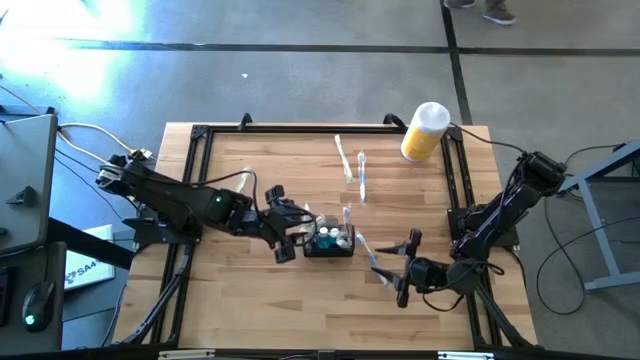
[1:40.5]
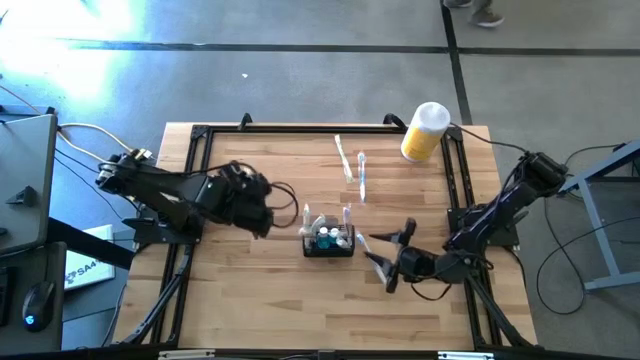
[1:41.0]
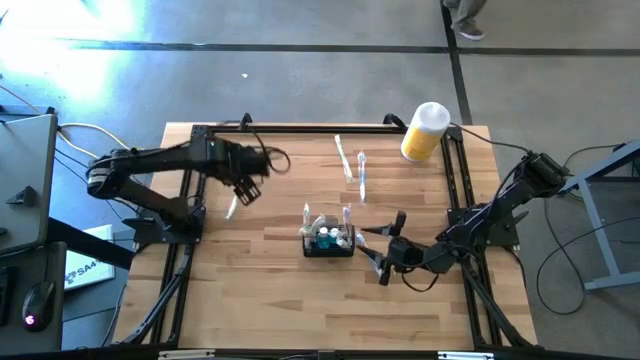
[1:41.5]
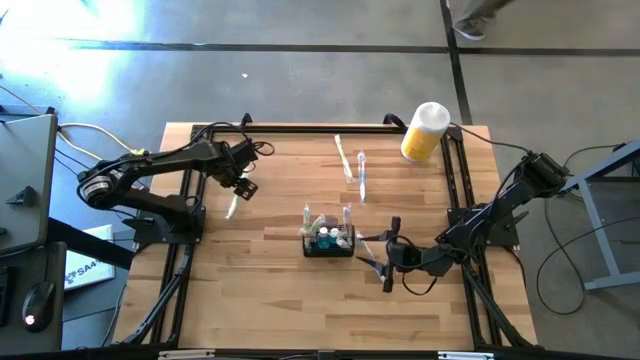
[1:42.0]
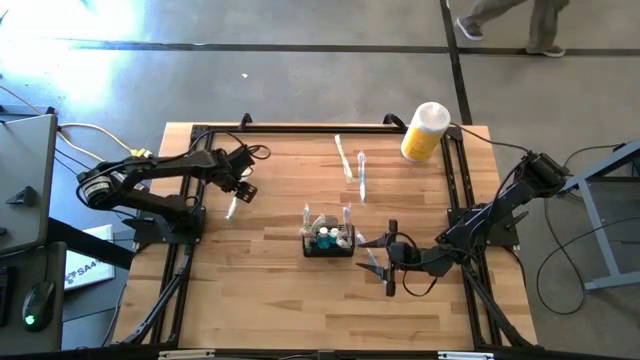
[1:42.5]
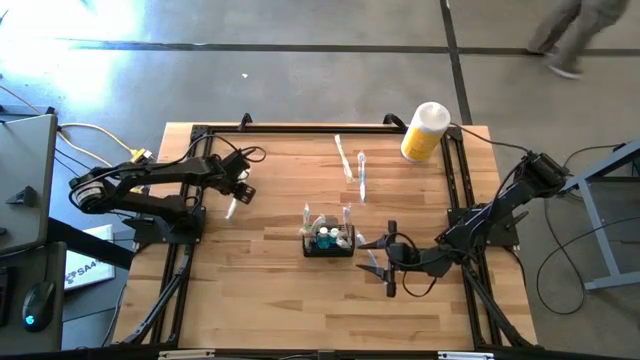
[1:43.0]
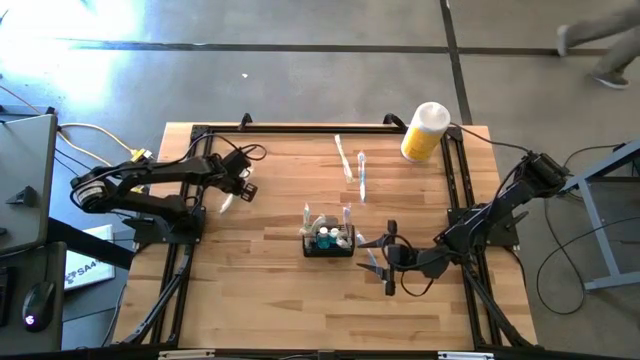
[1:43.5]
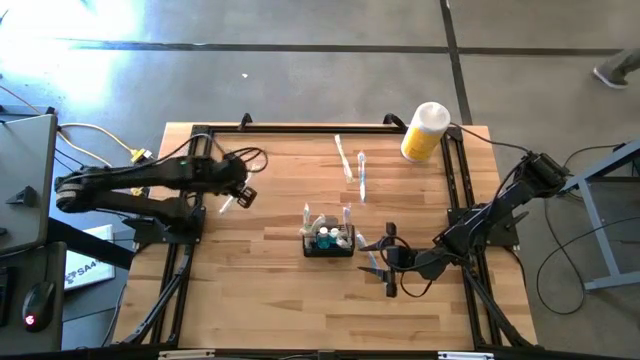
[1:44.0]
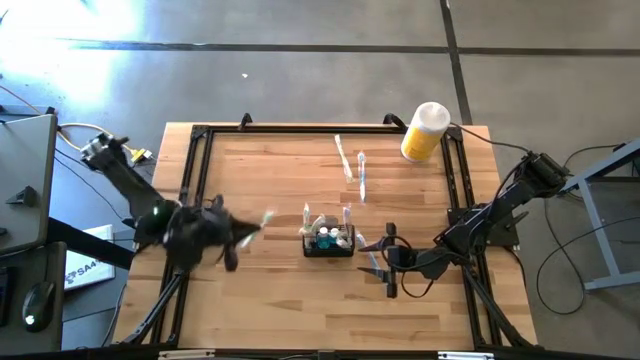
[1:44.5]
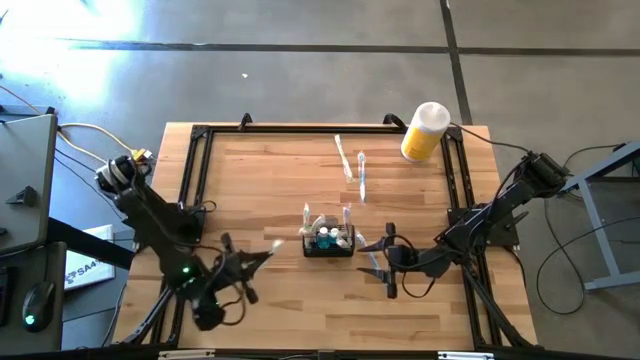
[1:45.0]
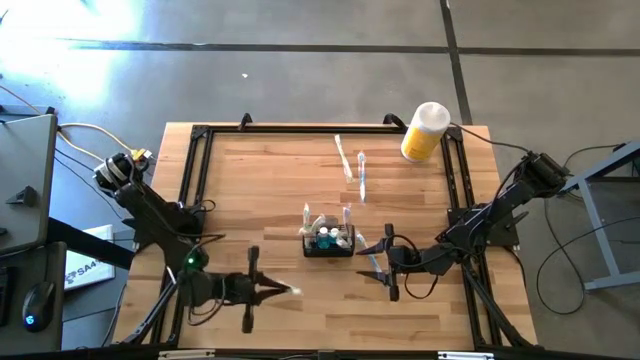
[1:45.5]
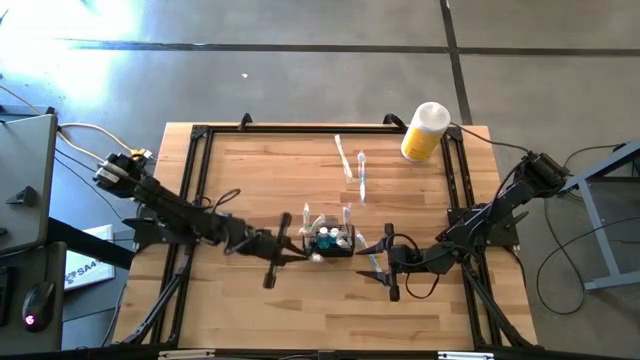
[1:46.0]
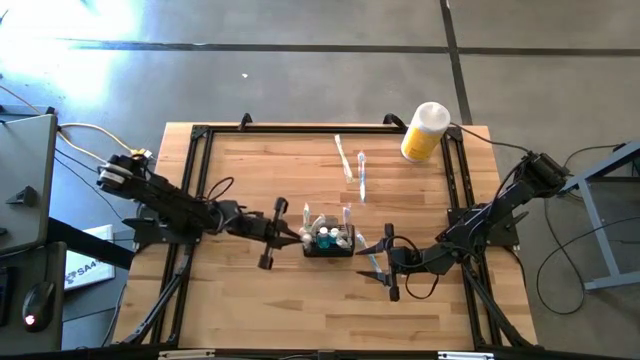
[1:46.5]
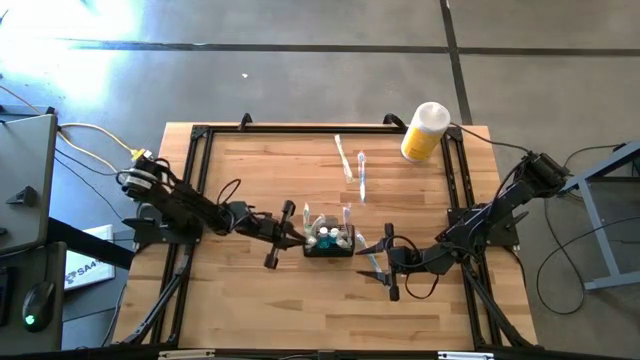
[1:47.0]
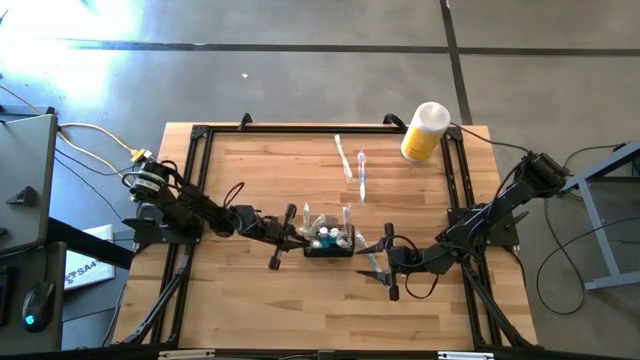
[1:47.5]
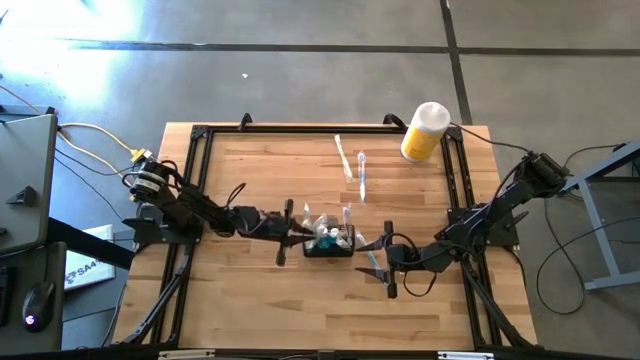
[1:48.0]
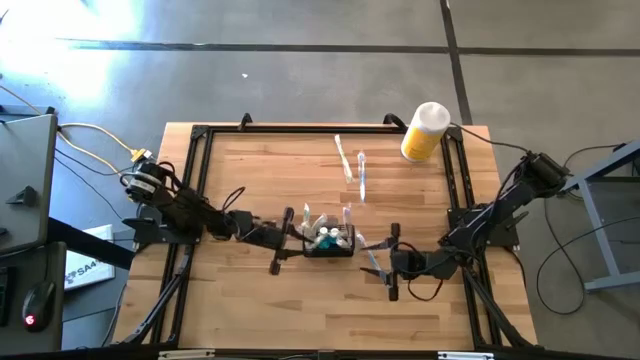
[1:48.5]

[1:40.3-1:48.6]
Task: Pick & Place toothbrushing station
Put the left green toothbrush into the wire organizer

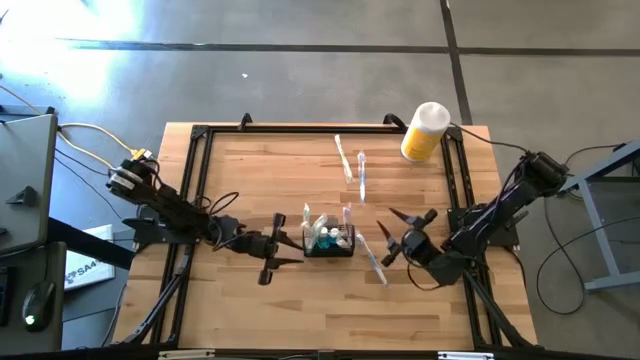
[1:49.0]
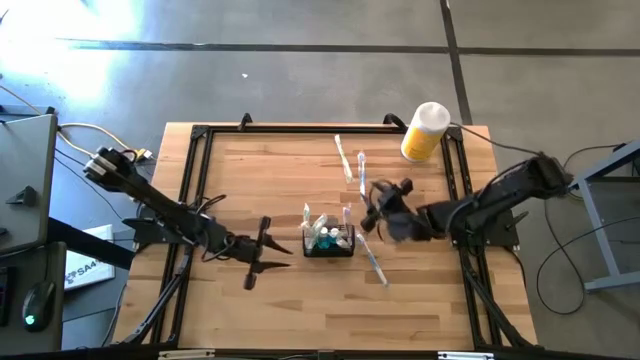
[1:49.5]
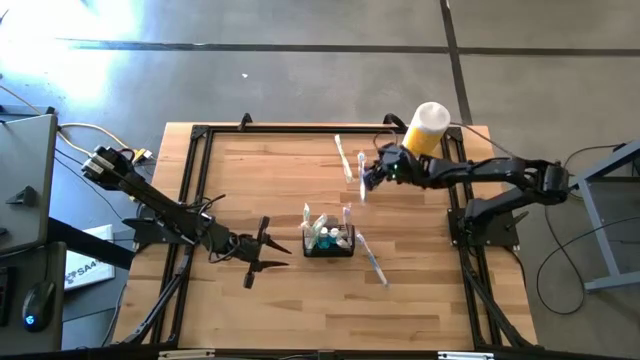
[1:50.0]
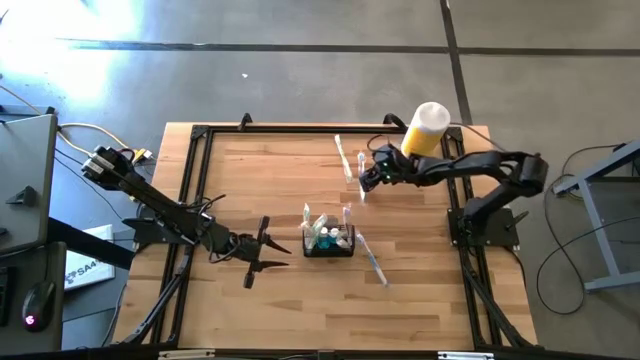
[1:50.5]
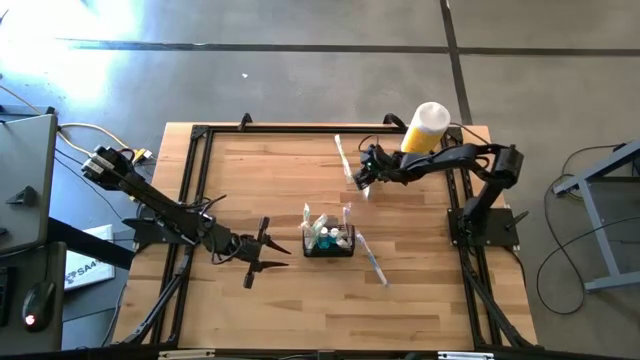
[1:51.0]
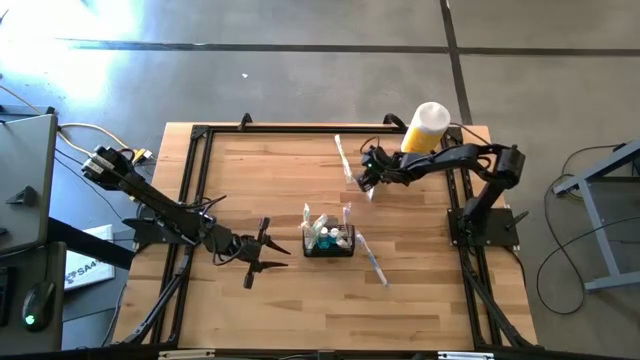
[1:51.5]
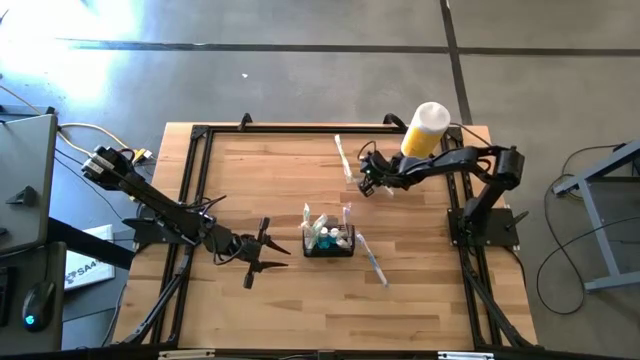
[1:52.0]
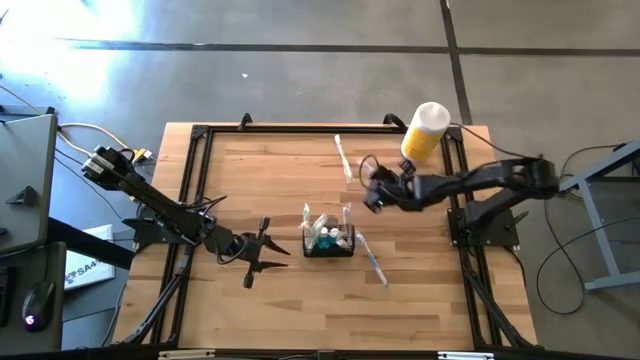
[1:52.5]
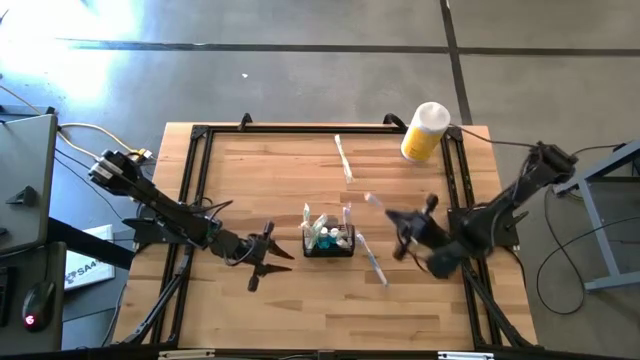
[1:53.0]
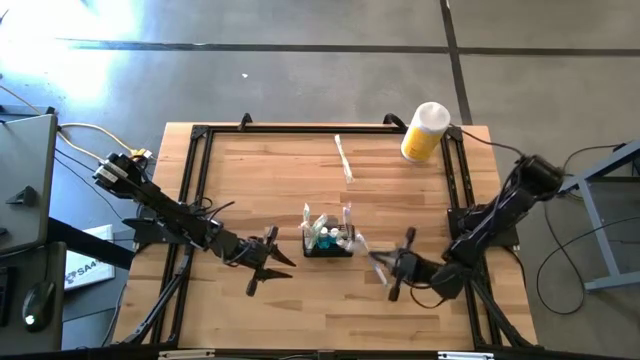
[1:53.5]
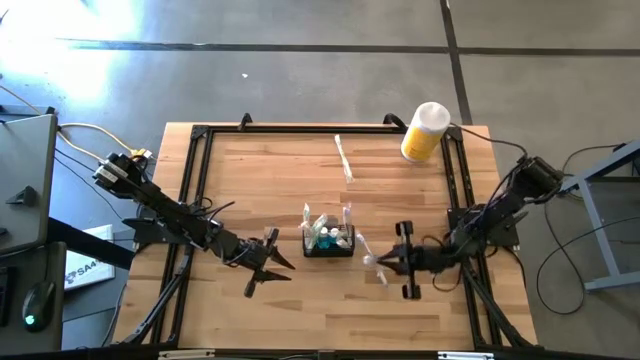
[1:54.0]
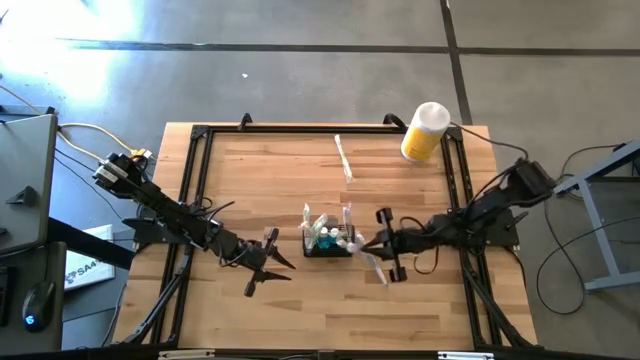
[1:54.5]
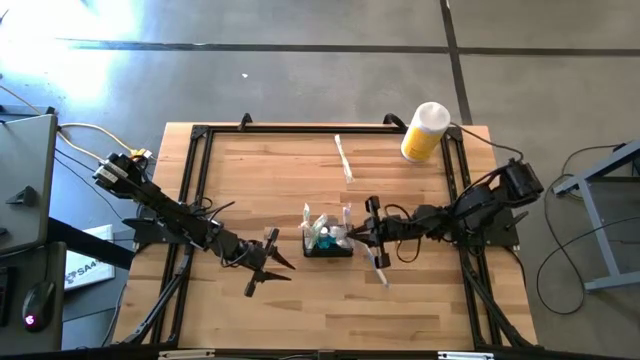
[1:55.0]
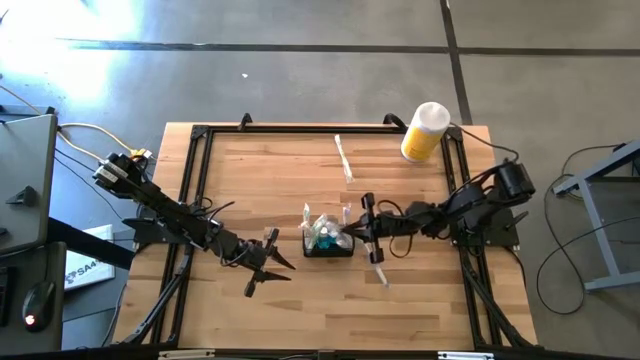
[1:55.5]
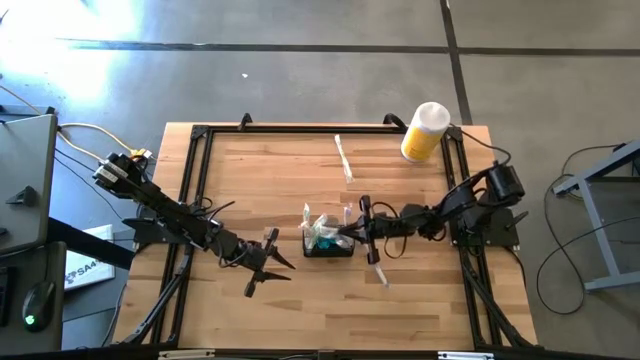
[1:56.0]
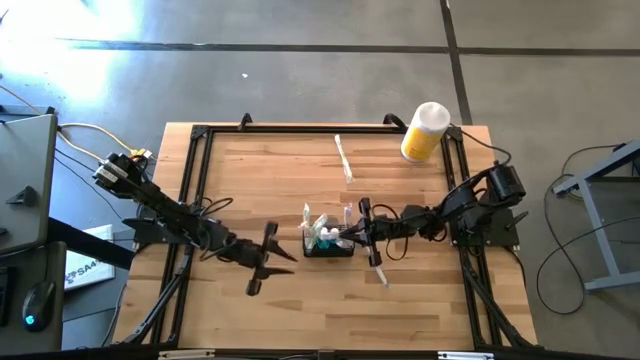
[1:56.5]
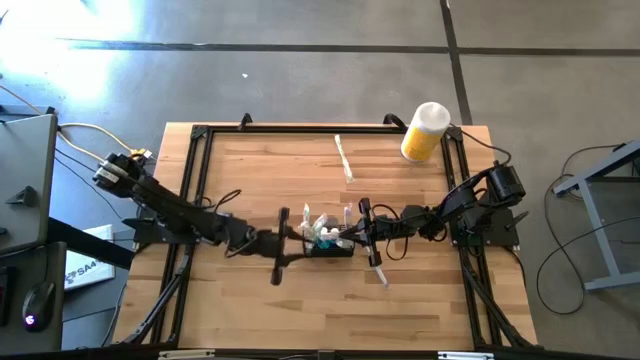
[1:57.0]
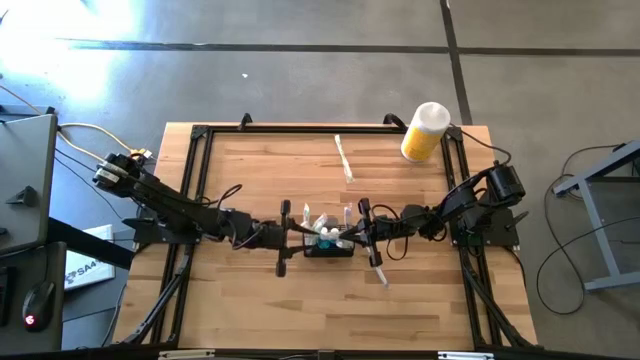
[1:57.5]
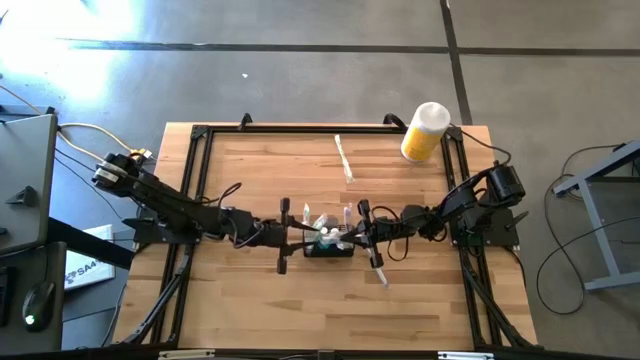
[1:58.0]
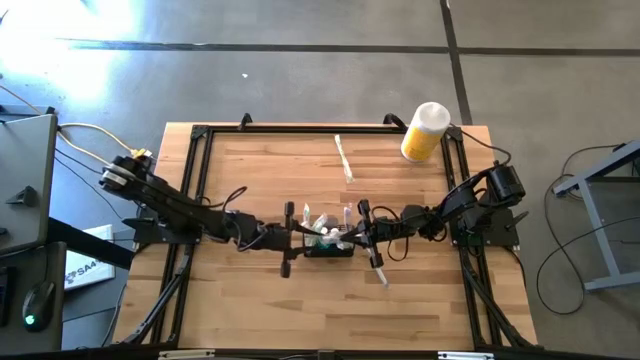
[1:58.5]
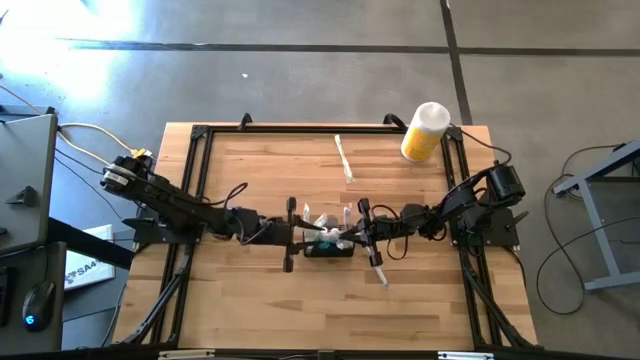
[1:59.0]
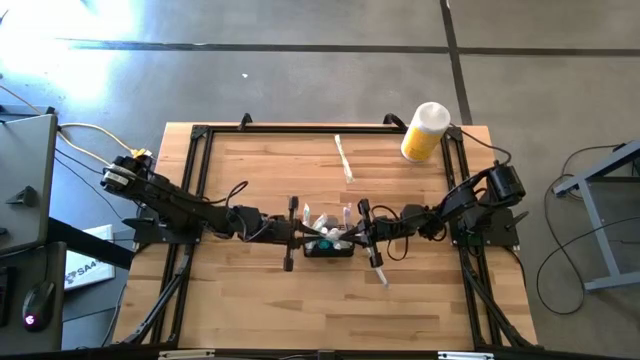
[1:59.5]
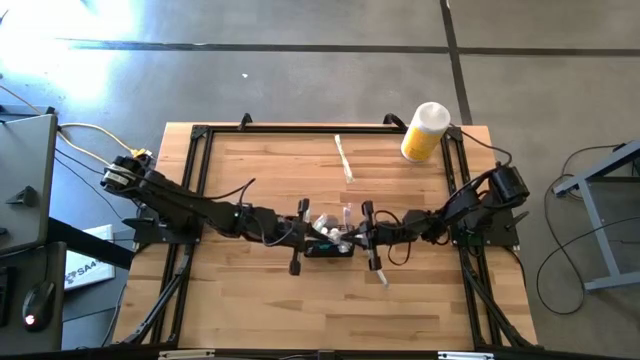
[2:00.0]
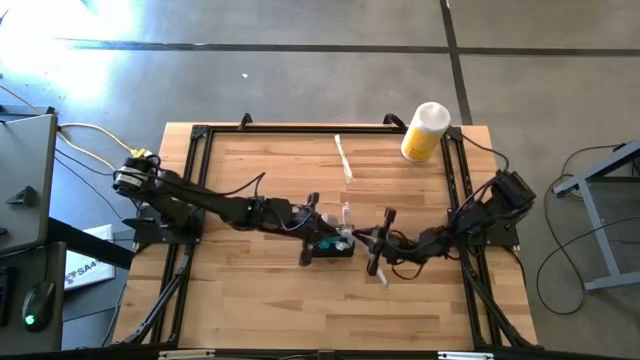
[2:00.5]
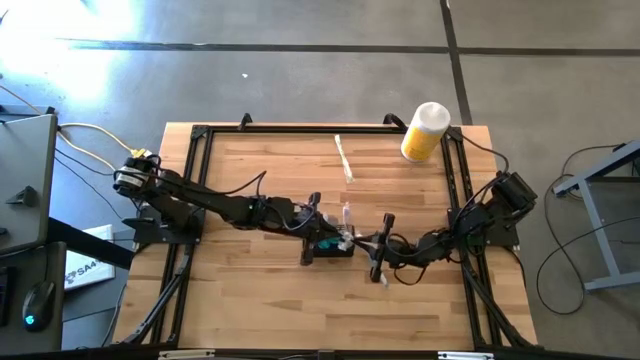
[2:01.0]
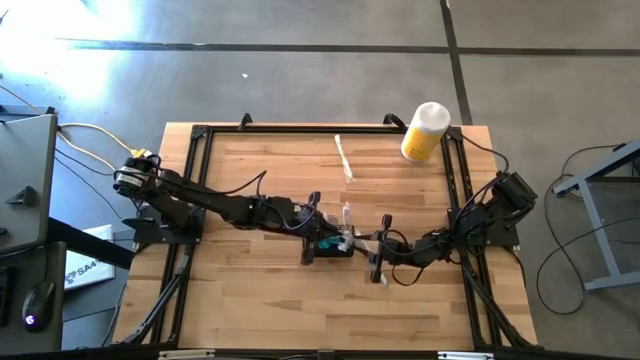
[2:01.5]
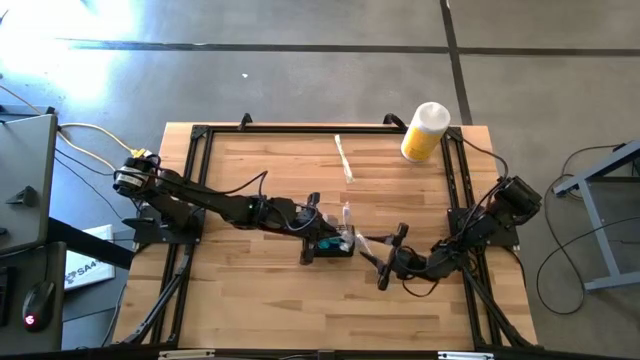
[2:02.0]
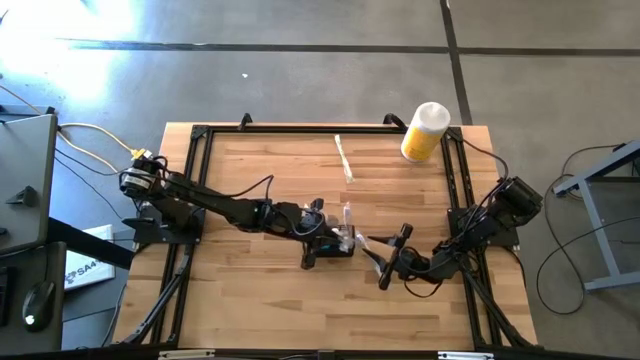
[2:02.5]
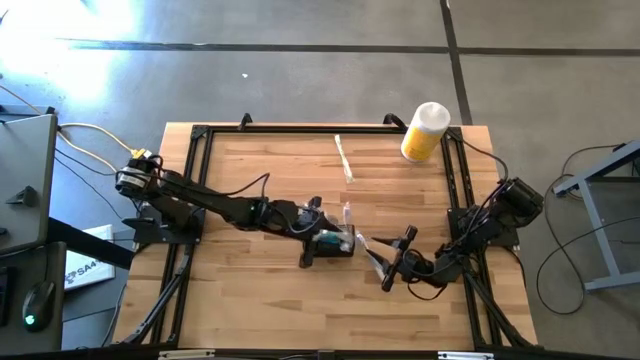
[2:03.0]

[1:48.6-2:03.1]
Put the top blue toothbrush into the wire organizer
